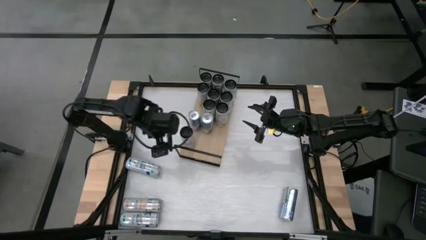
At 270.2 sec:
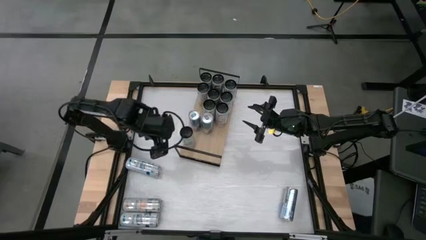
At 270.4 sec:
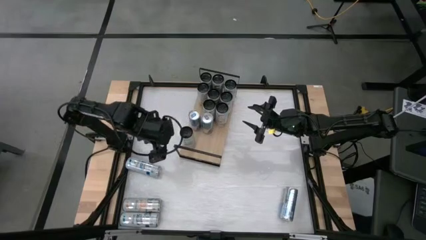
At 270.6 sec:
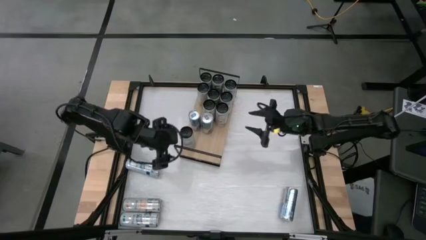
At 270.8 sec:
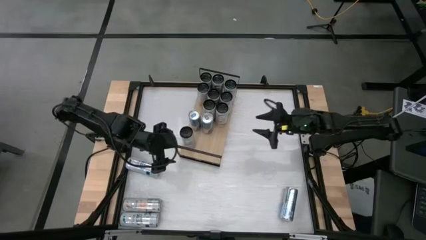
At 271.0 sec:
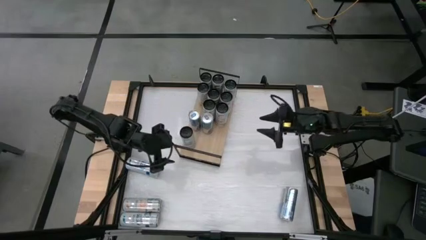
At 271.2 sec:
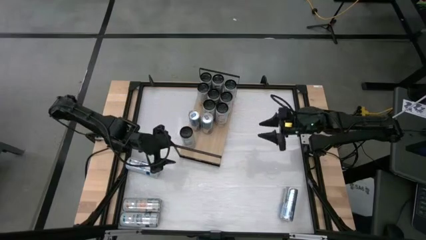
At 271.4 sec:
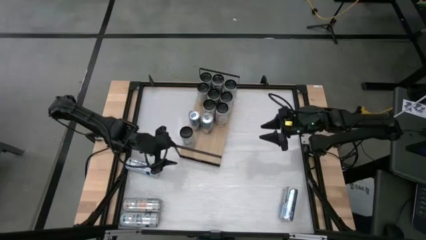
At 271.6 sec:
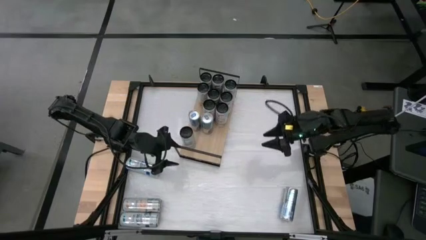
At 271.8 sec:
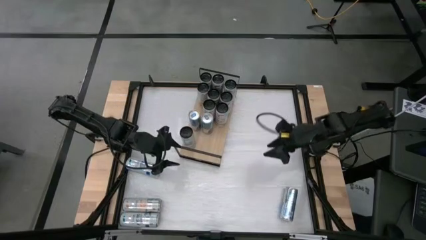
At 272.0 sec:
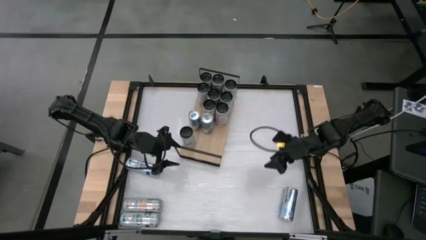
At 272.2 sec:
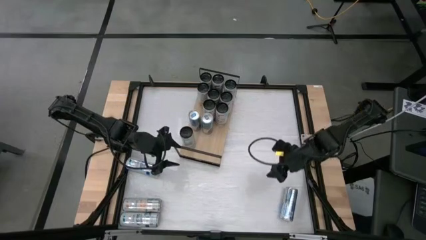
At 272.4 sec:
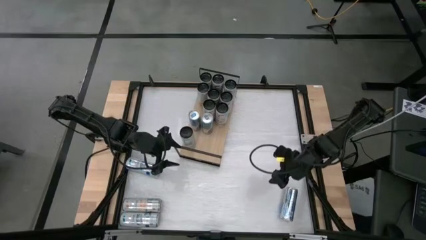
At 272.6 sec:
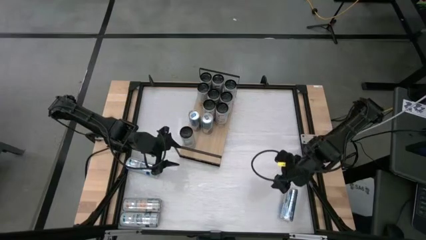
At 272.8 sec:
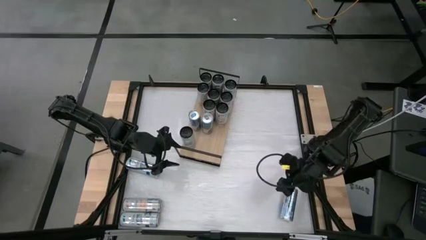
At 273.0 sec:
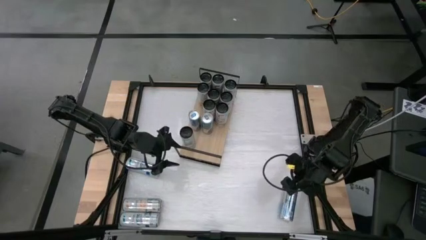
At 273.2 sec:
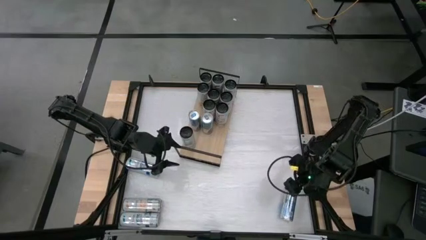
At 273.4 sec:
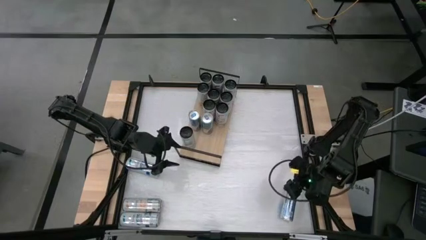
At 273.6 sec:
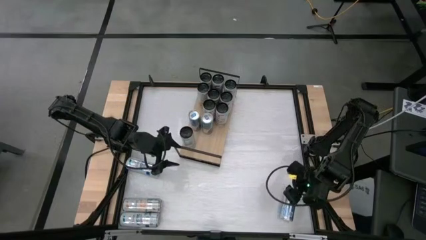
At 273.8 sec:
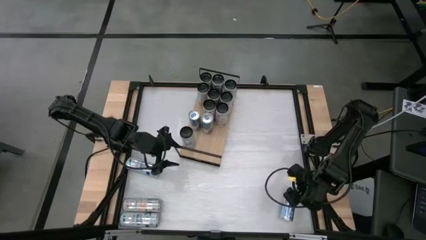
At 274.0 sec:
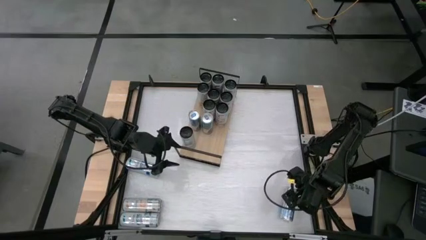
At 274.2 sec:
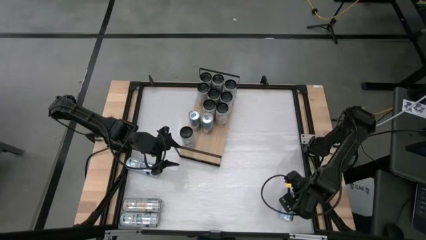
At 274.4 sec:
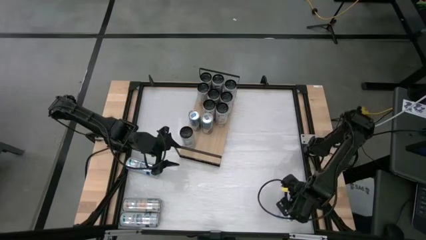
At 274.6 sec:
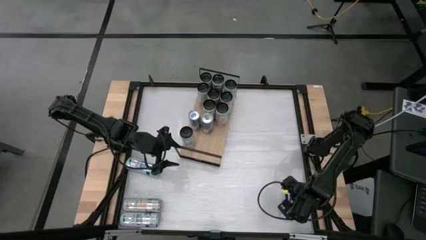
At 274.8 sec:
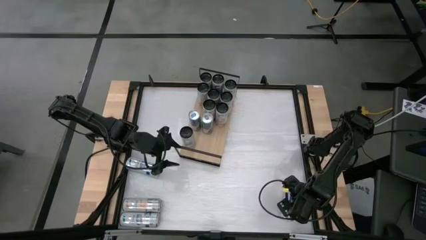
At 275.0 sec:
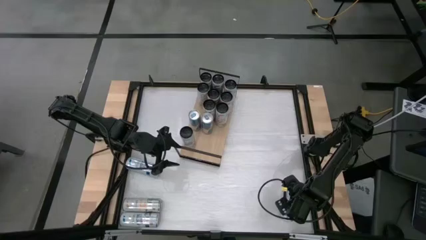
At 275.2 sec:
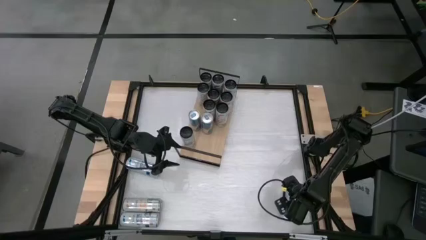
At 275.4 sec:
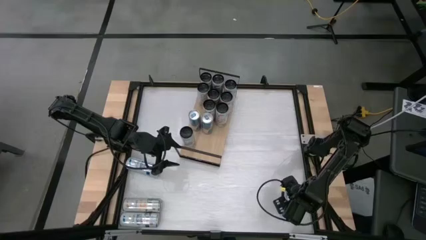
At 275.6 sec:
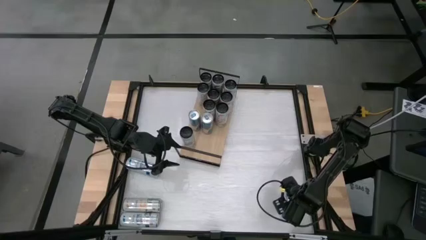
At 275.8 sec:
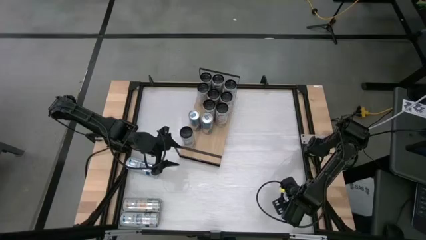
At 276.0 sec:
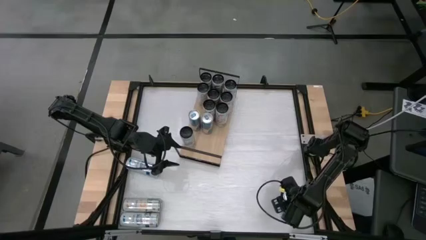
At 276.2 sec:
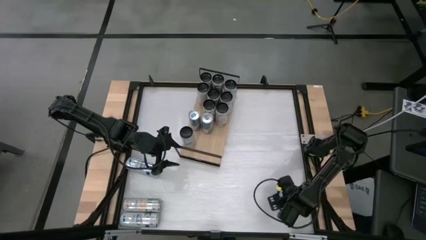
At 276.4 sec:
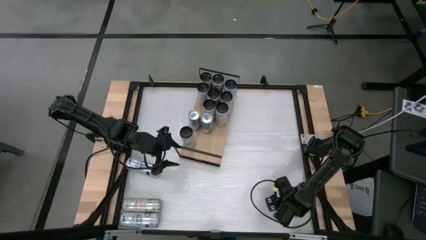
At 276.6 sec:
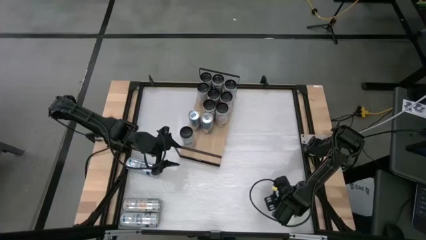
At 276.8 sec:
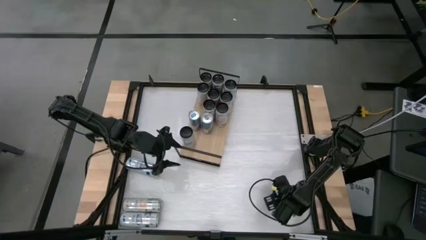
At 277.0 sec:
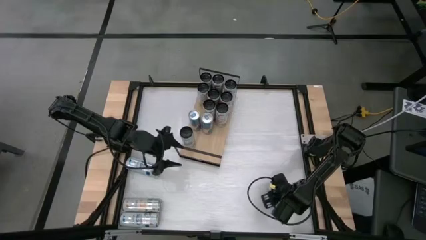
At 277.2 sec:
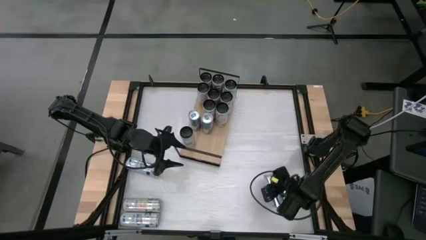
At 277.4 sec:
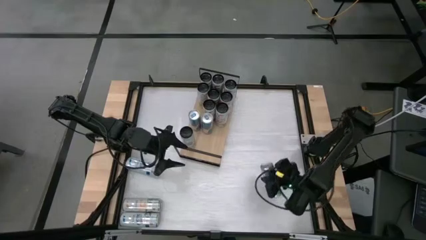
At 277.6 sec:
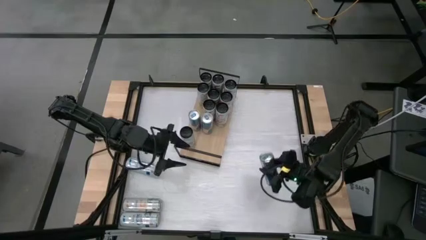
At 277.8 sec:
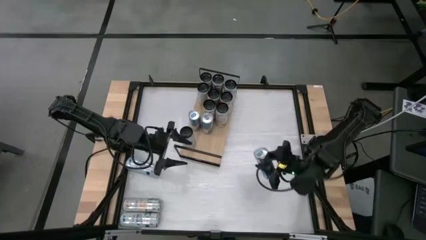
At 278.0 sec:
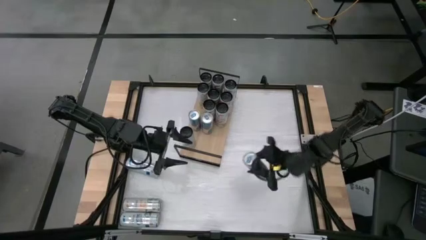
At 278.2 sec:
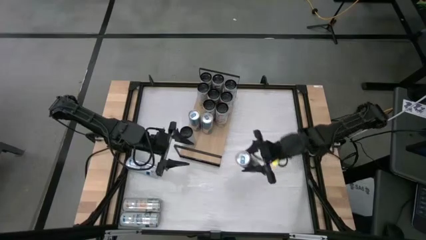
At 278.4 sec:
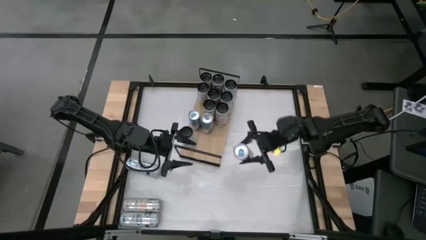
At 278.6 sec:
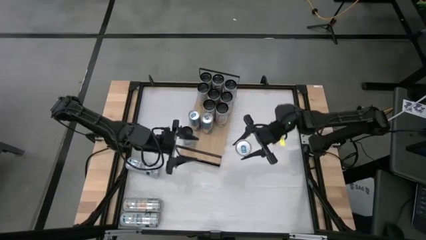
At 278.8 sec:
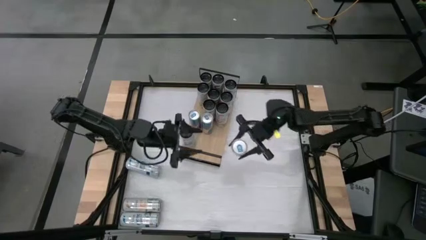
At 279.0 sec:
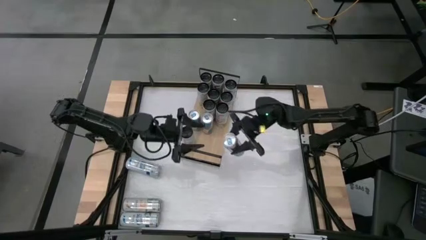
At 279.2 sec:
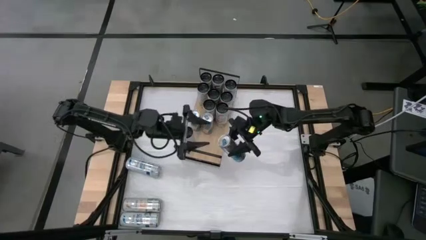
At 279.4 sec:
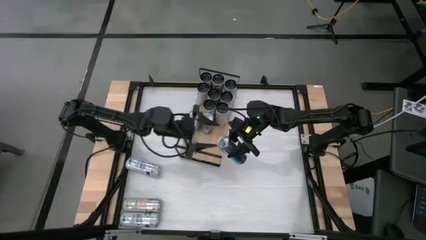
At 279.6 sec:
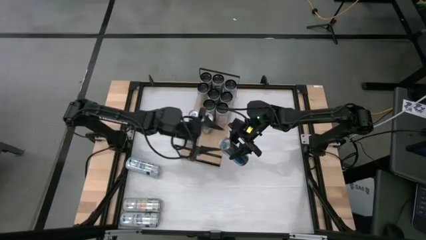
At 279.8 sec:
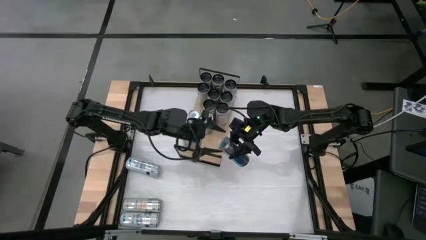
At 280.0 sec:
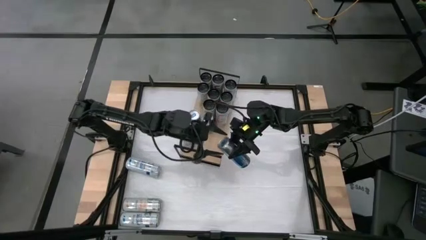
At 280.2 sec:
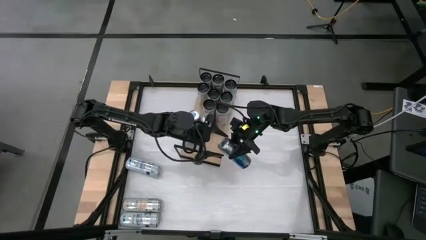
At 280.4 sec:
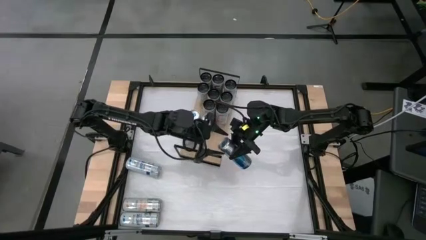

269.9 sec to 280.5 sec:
Task: Place canned beverage on shelf
Put the bottom right silver soda can on the shelf aligned with the other silver soda can

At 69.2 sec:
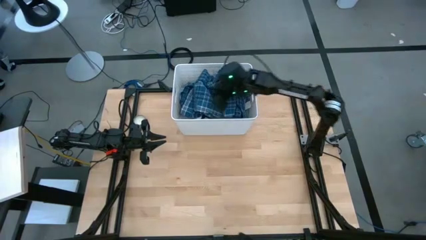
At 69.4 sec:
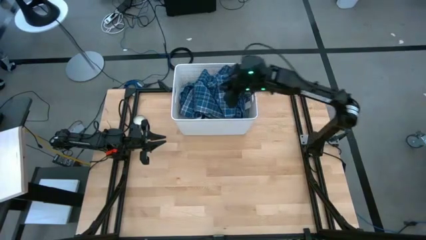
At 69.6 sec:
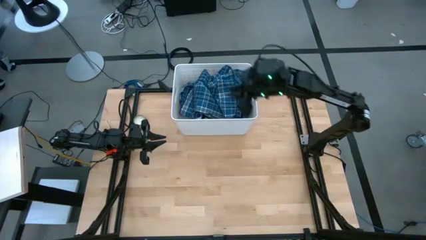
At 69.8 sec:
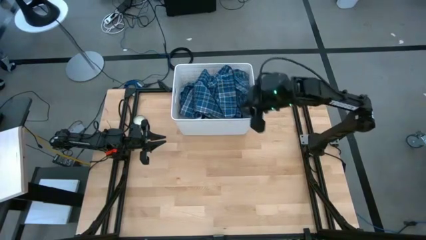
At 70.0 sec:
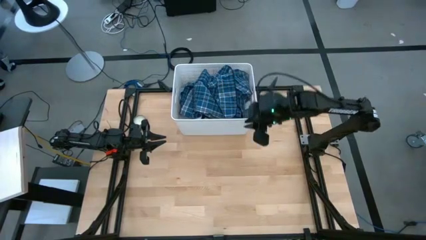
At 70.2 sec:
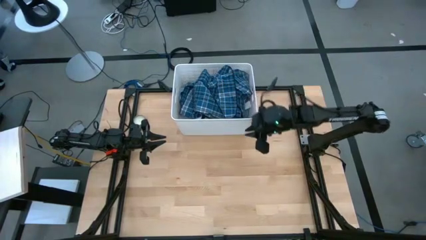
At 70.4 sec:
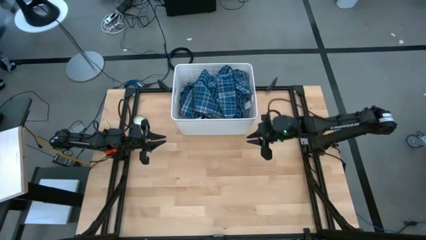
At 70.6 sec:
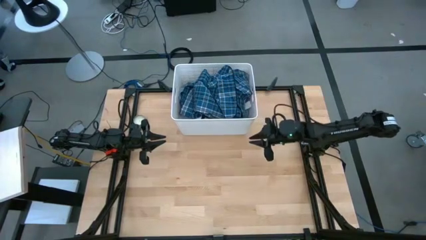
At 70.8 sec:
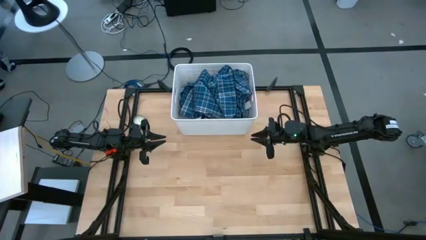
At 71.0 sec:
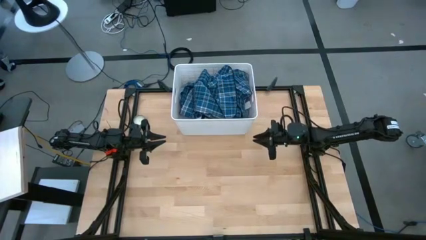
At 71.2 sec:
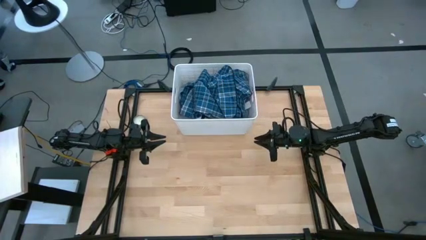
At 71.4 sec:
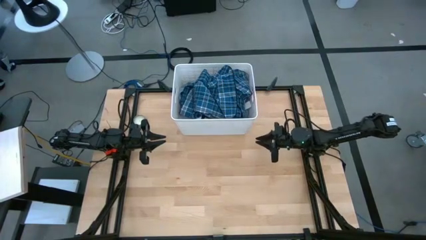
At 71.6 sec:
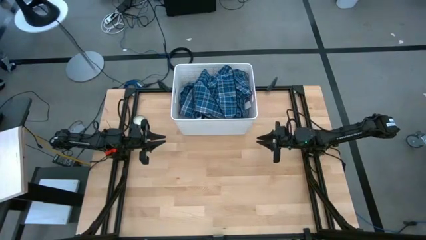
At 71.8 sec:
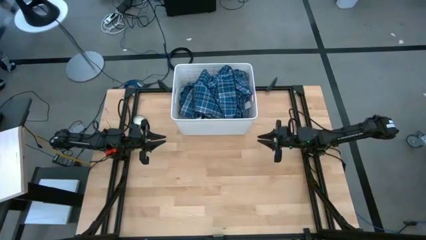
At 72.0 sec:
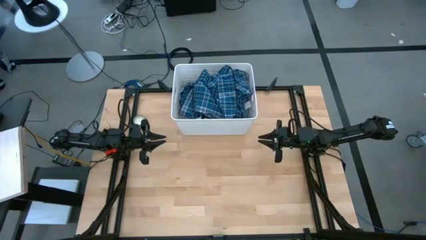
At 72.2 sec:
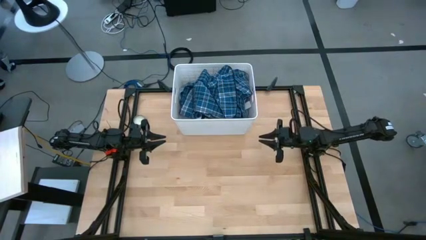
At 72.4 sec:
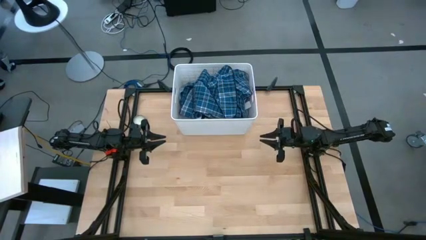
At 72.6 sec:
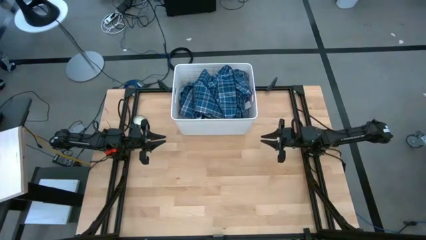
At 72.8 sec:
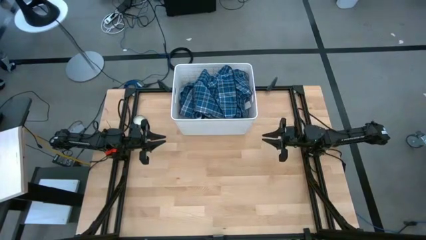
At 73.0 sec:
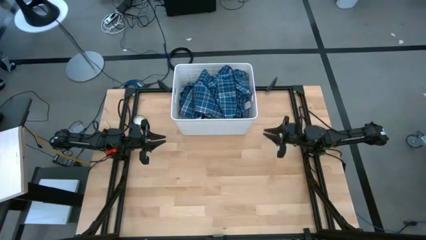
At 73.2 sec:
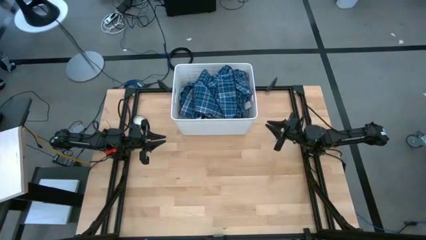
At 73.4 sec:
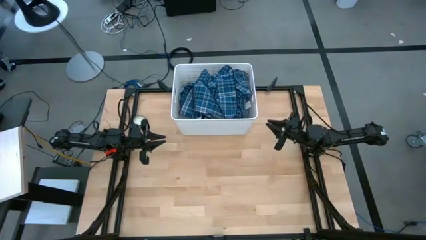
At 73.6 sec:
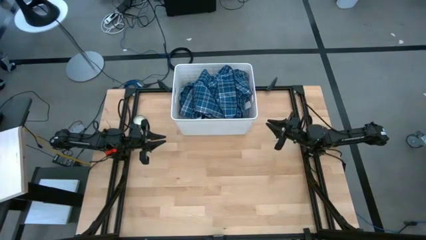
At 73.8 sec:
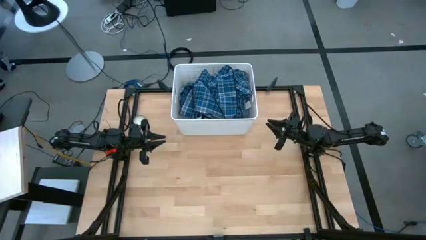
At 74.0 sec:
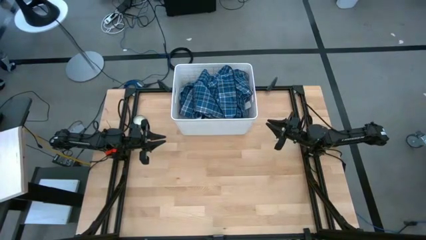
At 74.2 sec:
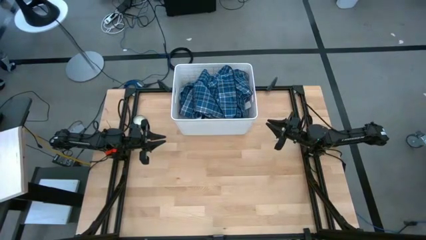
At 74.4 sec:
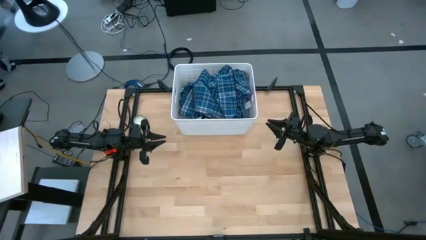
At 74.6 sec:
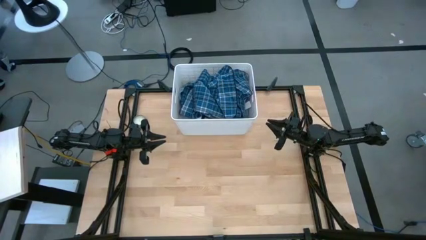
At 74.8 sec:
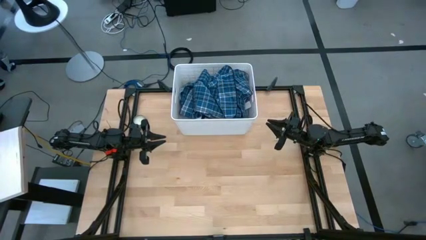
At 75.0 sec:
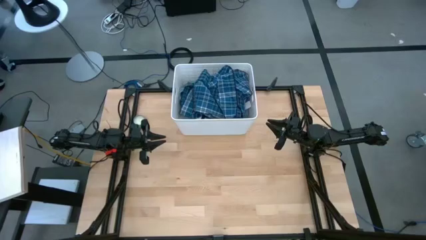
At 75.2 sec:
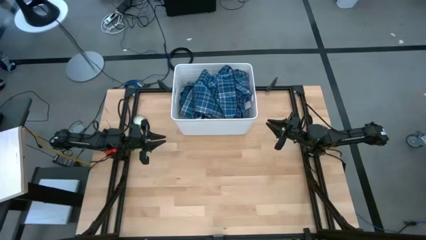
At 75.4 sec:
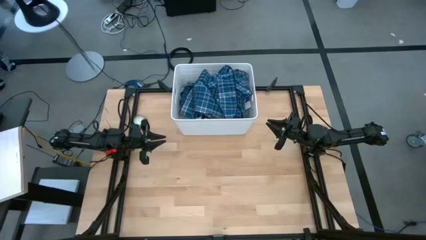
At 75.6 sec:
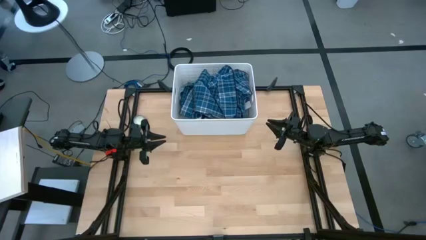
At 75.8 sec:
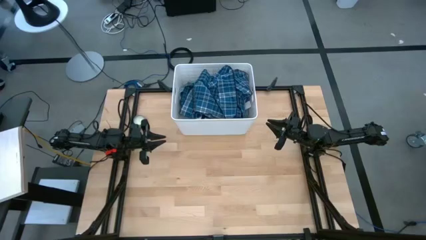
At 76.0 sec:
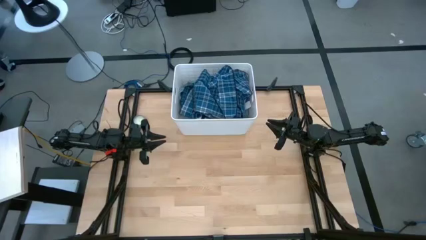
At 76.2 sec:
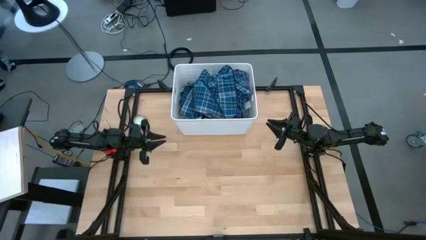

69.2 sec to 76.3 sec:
Task: Sort clothes
Return to Home Position
